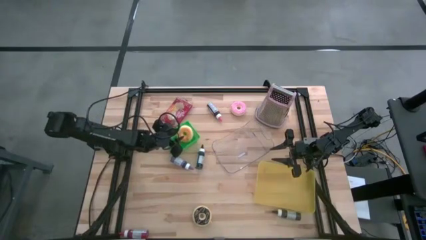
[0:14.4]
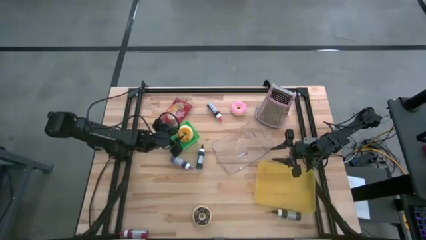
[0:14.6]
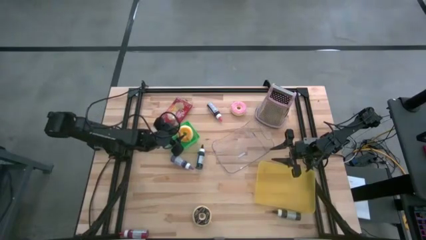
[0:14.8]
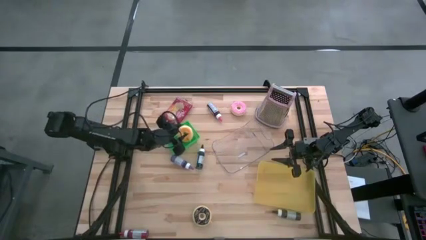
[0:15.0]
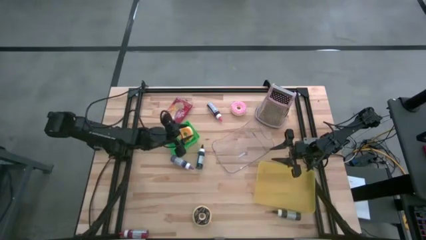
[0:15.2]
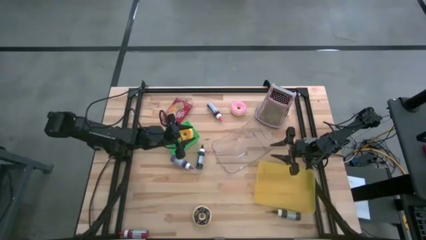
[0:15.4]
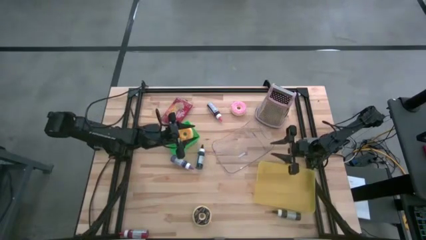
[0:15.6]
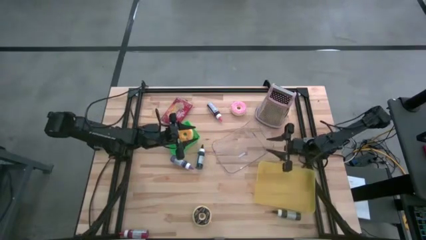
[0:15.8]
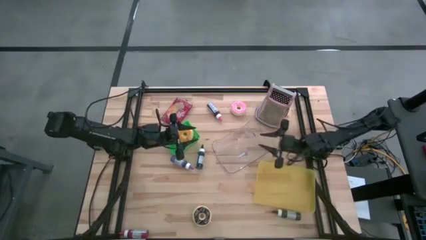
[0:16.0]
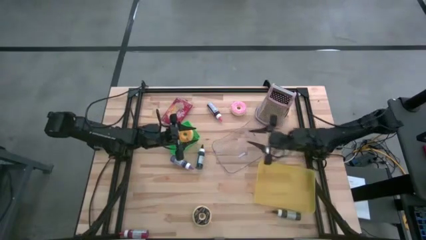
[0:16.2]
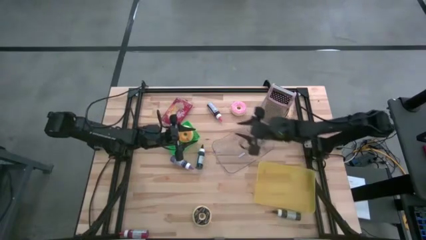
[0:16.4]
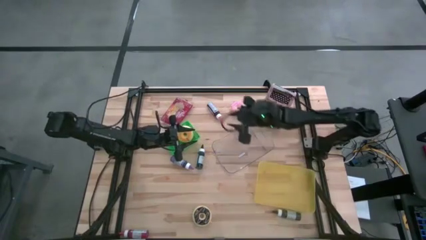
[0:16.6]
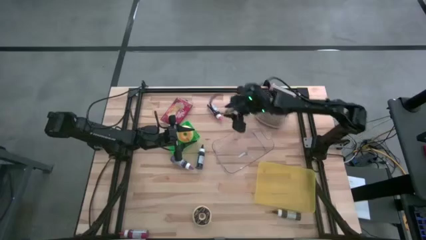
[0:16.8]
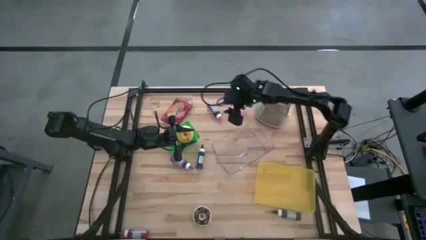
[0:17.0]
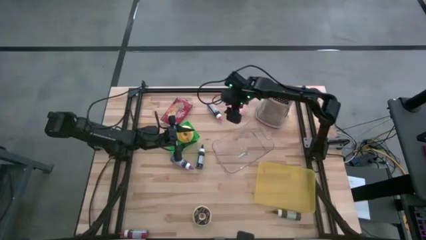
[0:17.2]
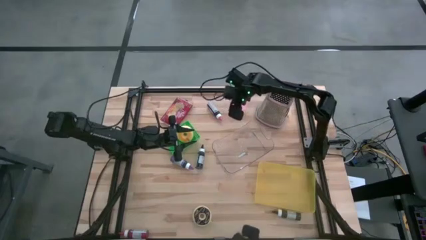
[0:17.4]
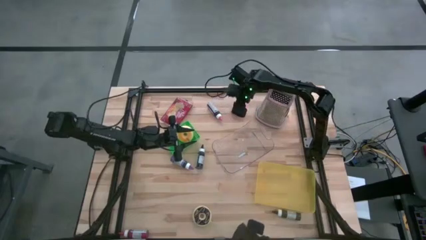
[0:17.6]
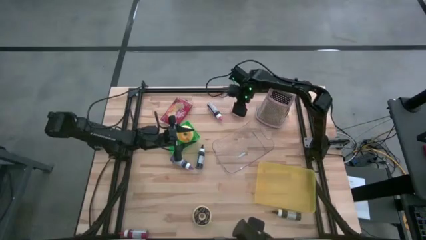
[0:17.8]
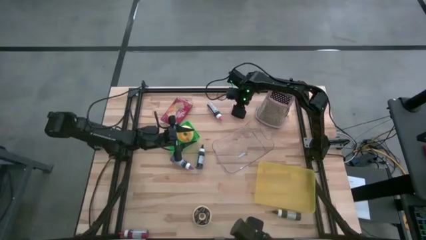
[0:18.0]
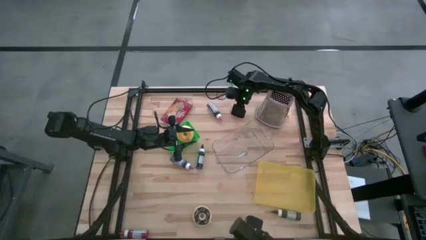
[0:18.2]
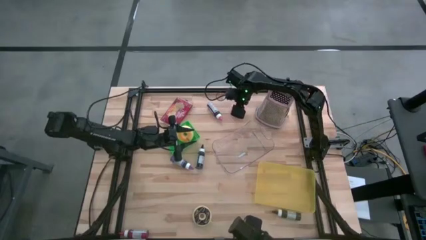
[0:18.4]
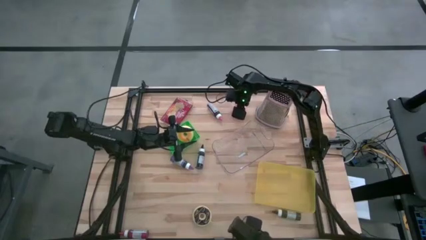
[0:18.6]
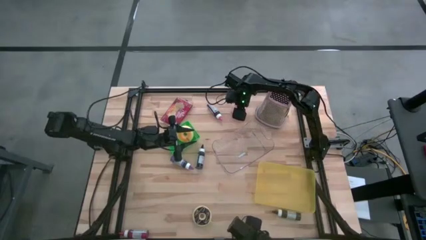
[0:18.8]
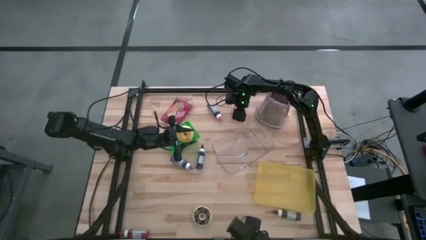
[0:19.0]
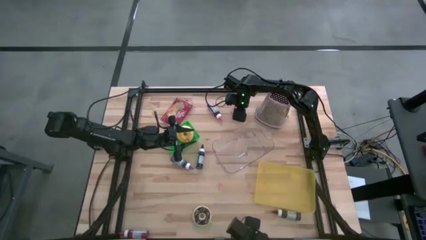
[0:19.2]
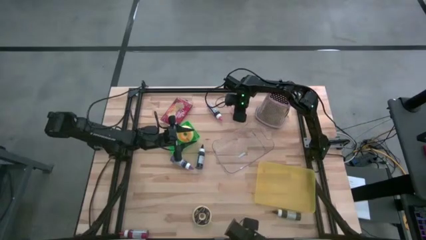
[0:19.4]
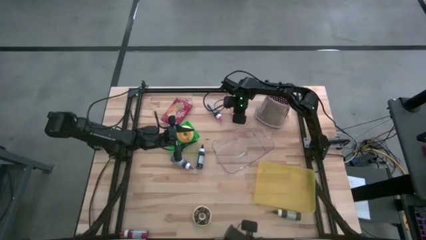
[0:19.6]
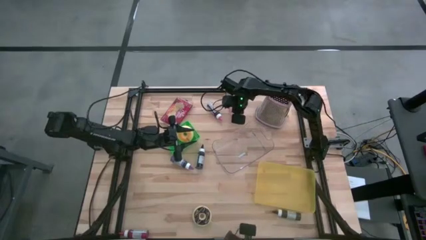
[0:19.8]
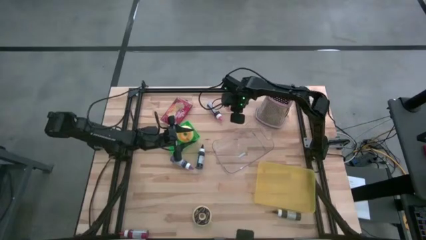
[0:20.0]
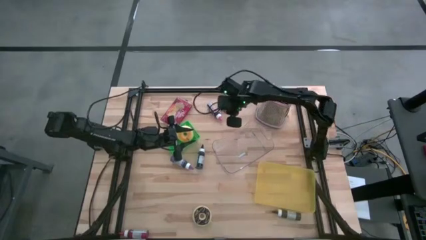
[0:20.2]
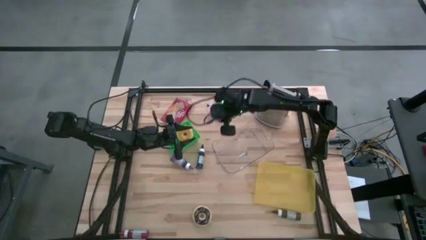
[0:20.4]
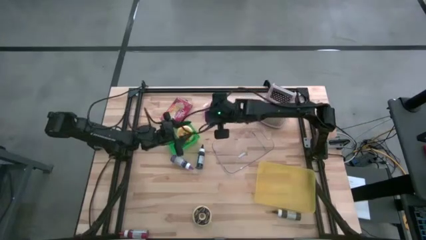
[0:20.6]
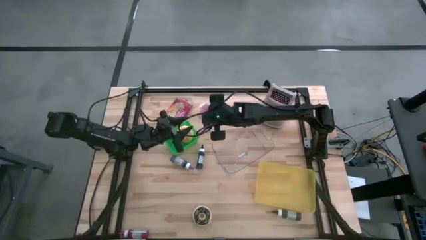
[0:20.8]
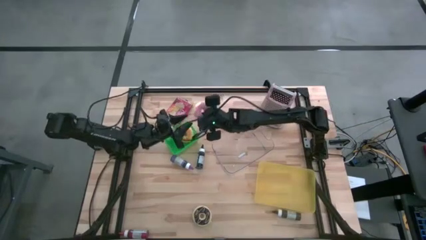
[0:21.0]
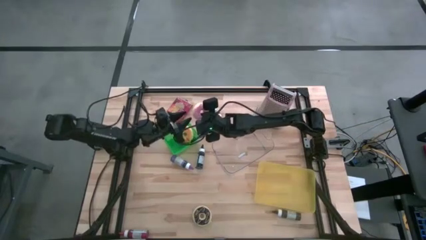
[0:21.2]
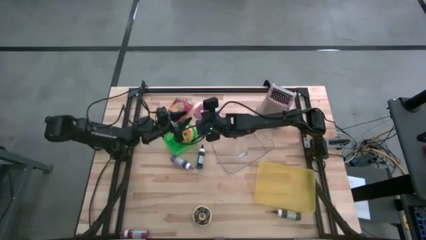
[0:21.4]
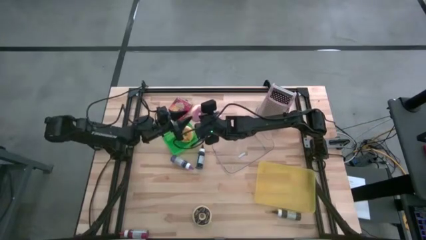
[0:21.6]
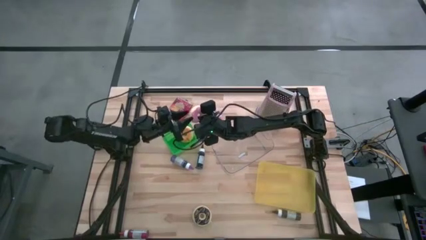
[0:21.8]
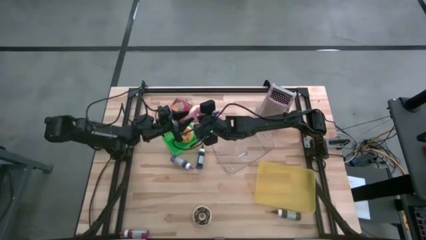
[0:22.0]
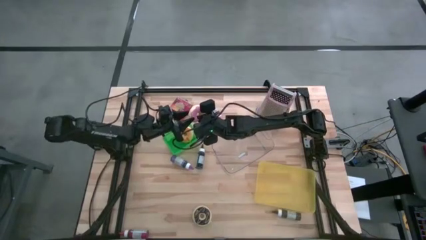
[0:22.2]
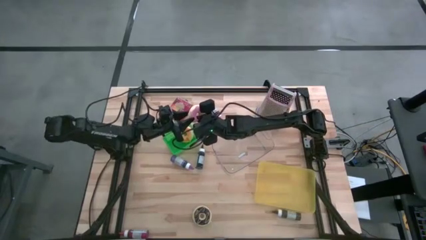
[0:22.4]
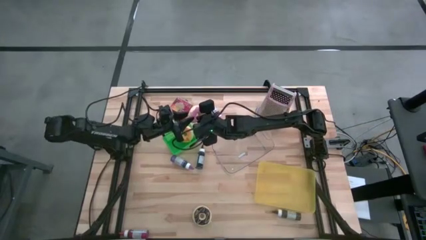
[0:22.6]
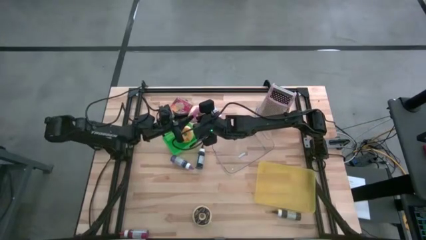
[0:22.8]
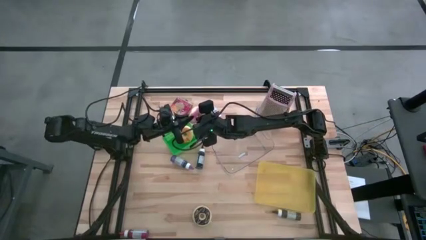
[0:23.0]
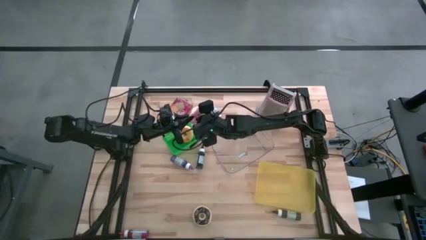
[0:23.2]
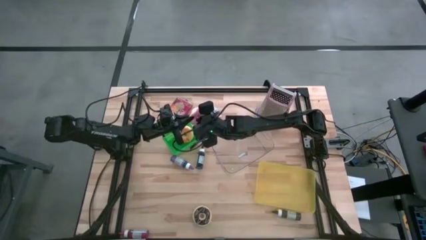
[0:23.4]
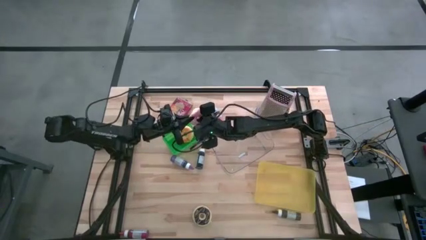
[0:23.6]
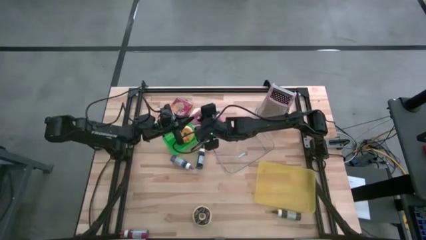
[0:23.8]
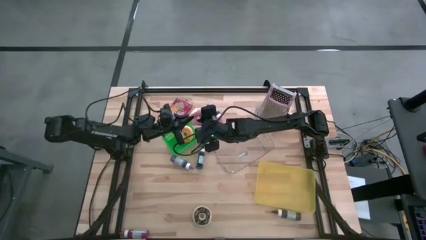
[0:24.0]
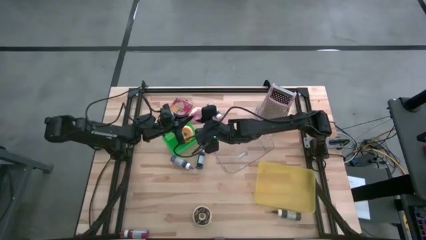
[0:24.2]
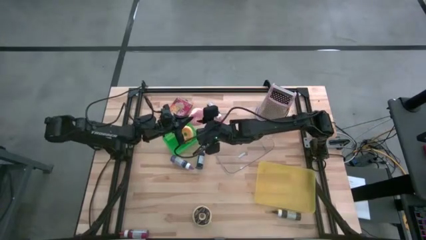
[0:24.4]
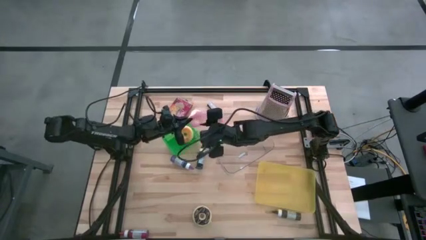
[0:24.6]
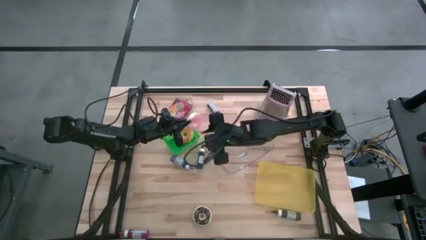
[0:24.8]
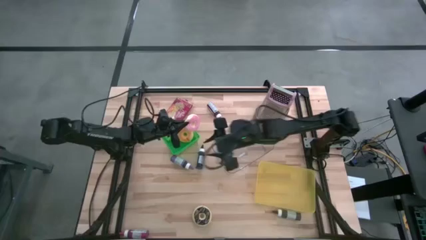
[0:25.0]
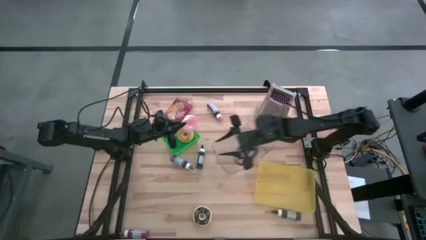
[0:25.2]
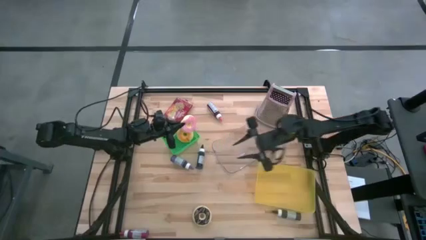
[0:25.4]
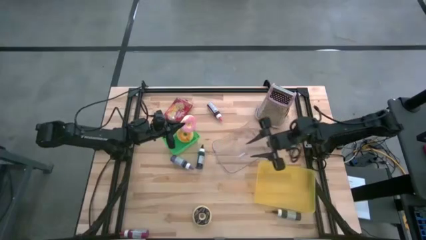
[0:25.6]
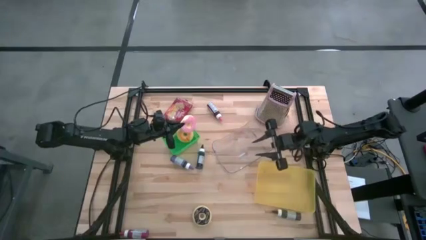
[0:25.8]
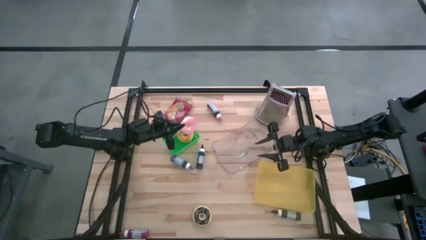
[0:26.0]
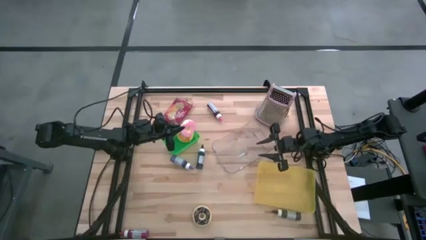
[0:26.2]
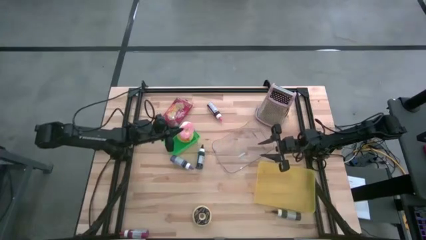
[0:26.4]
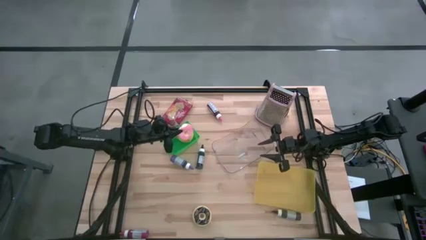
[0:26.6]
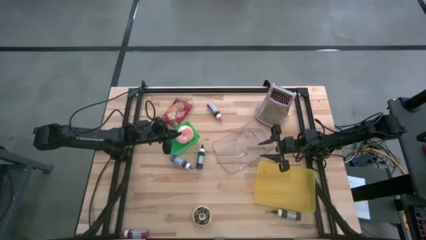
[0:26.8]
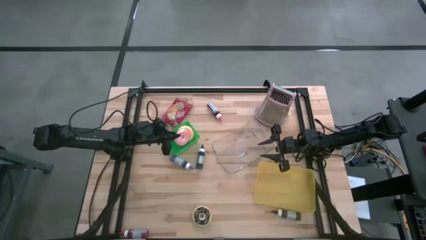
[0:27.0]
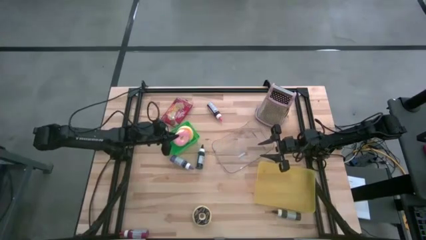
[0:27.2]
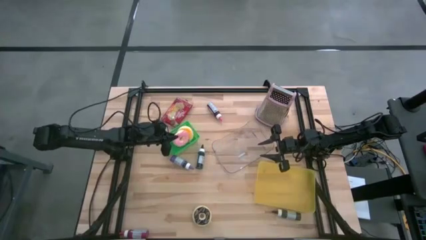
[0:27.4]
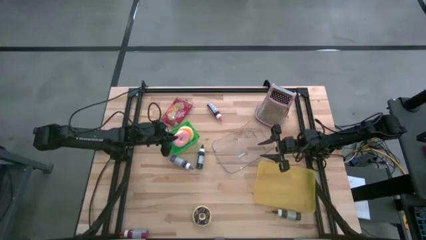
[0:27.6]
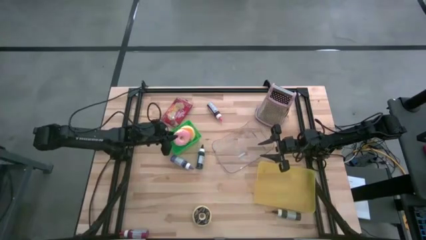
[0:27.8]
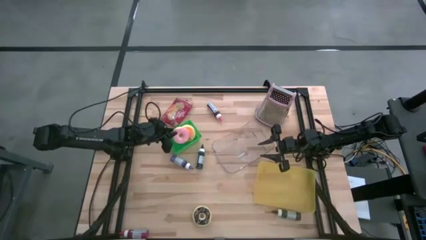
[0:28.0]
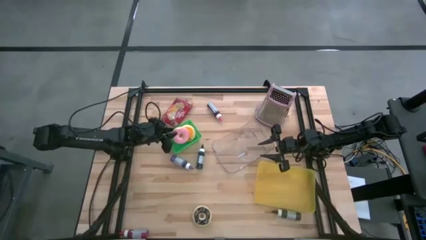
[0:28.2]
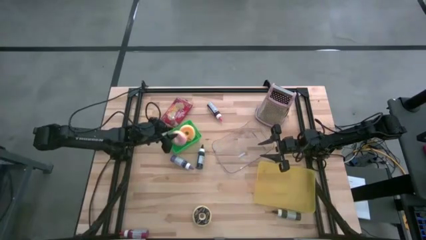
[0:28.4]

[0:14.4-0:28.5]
Task: Pick & Place Food Item
Put the pink donut into the green bin
